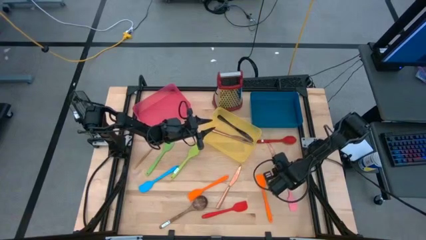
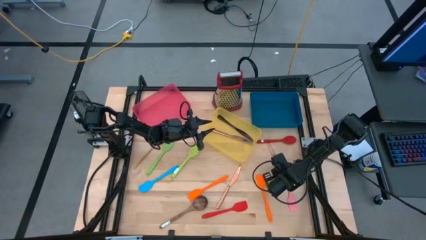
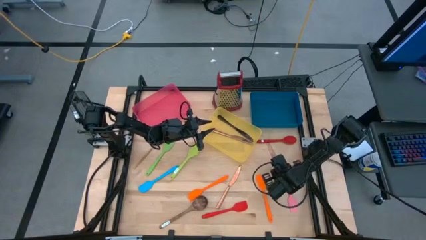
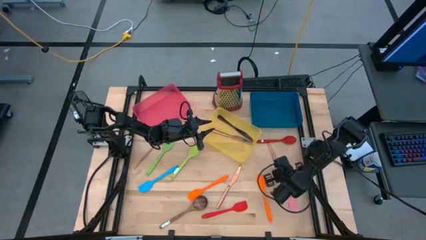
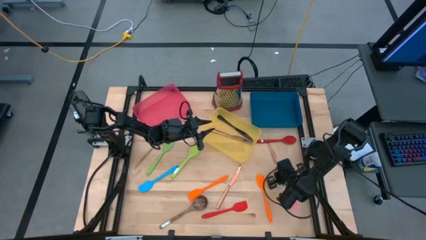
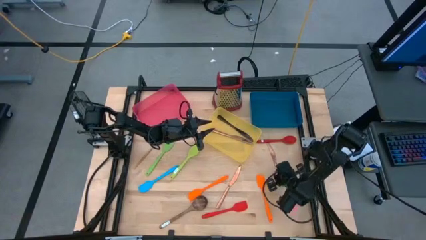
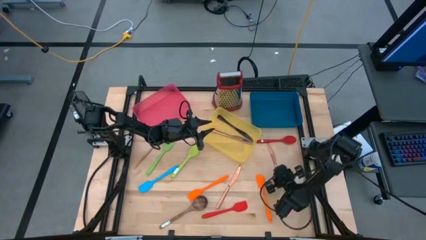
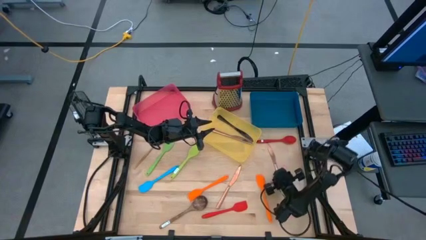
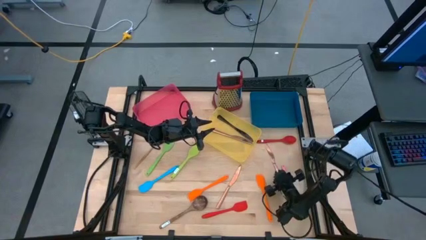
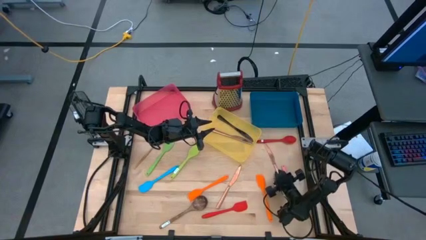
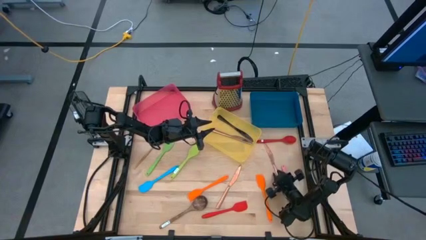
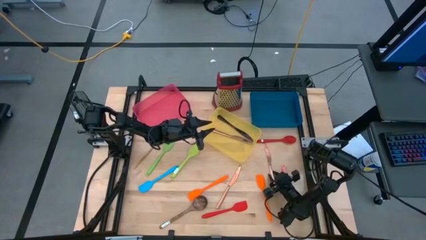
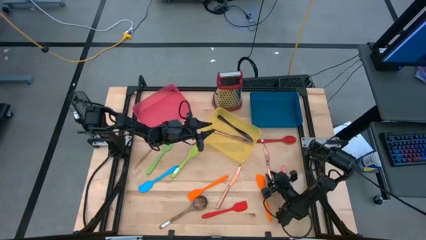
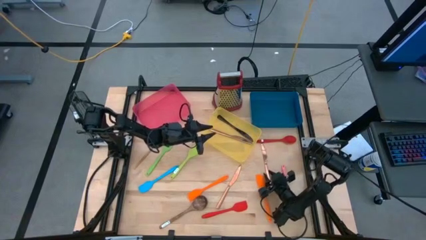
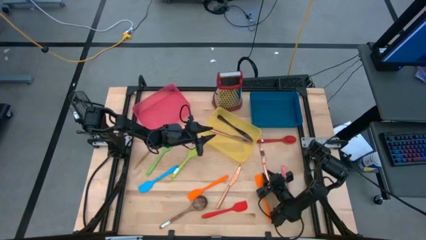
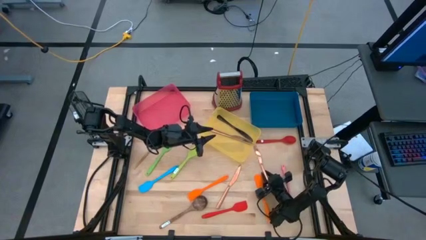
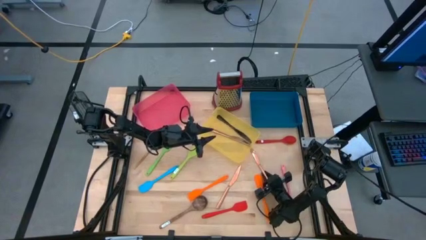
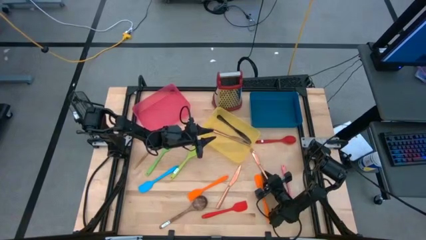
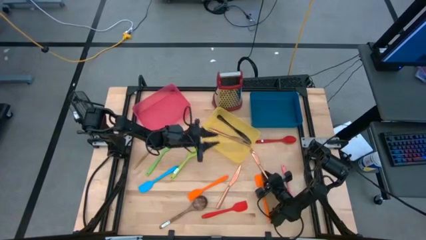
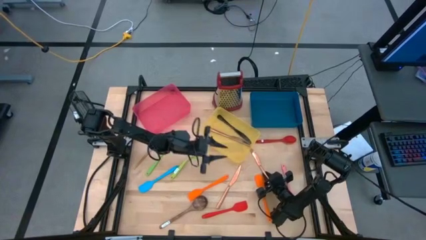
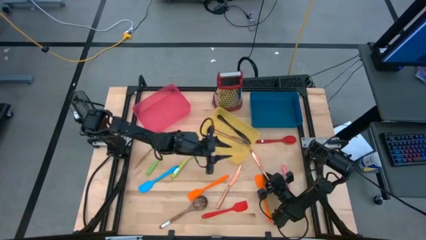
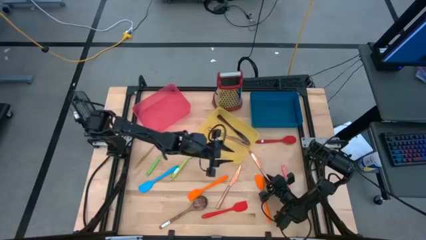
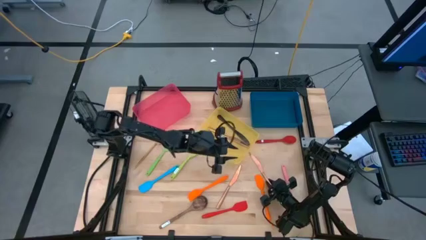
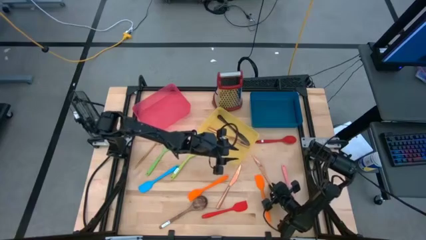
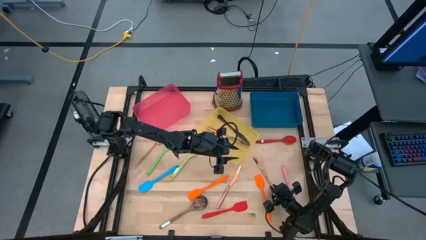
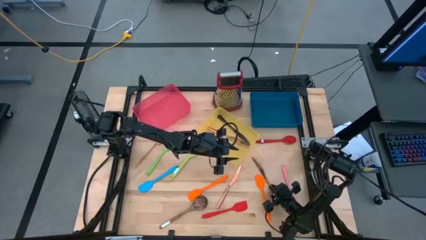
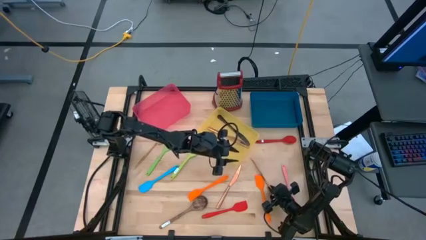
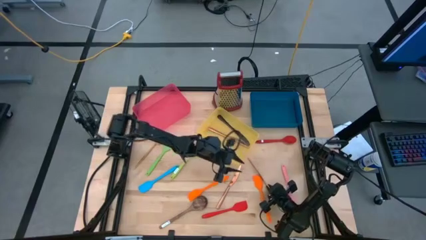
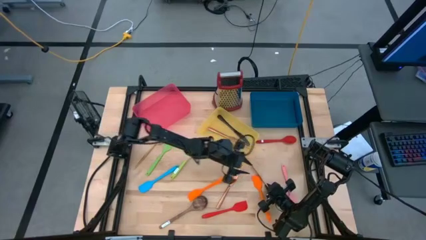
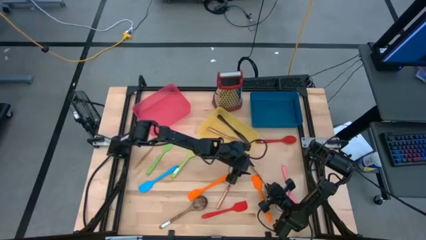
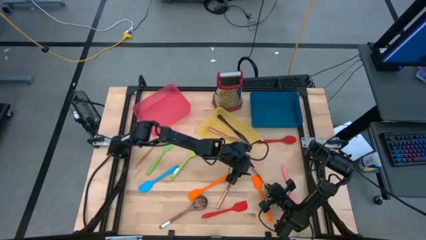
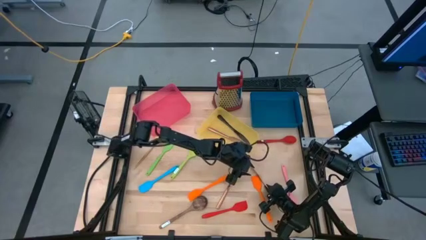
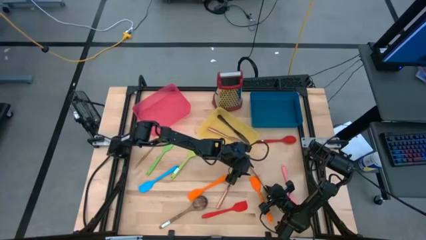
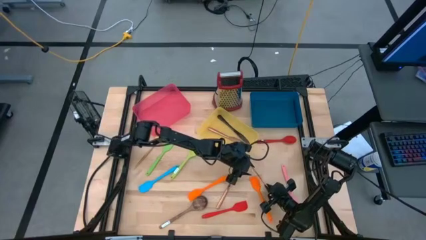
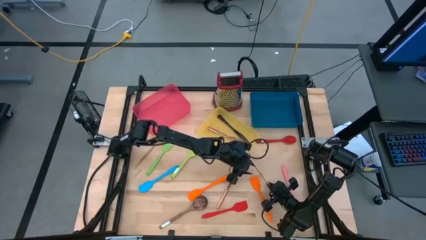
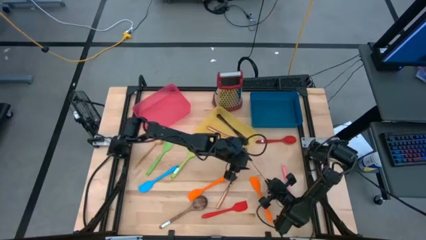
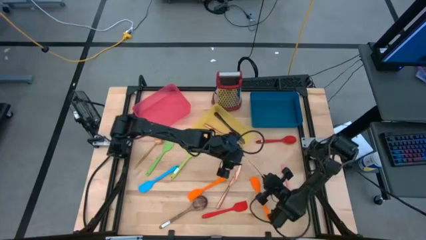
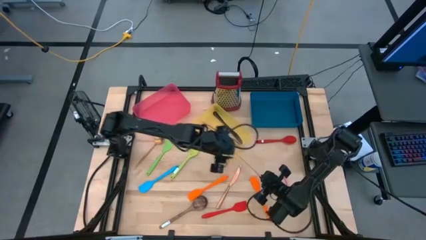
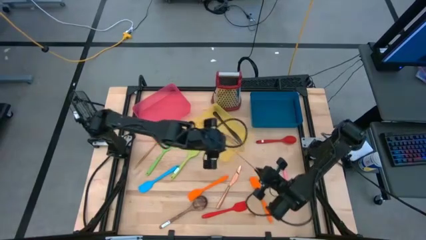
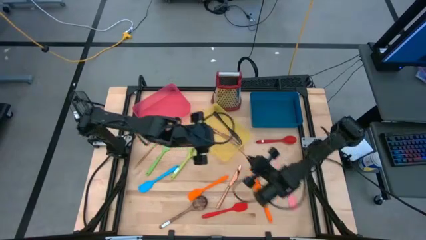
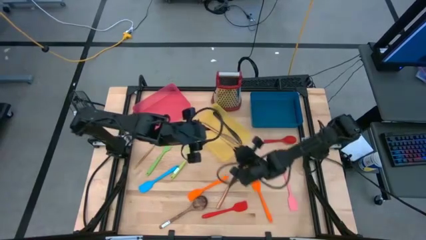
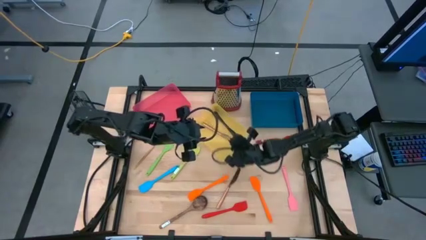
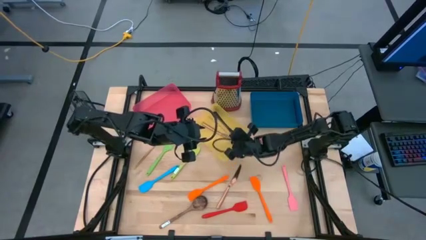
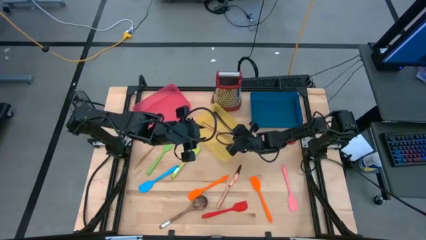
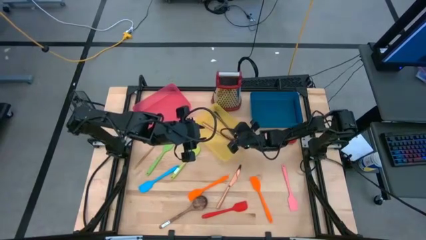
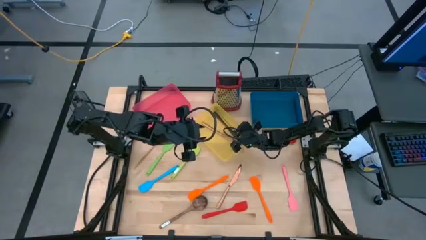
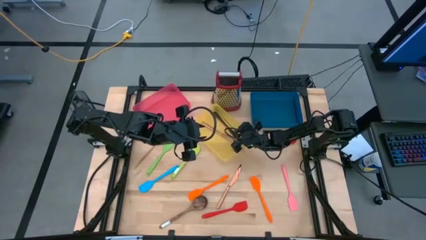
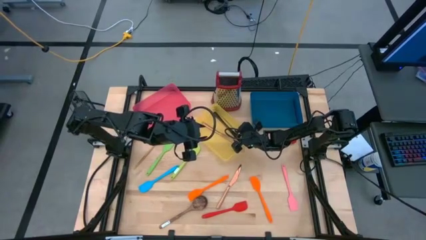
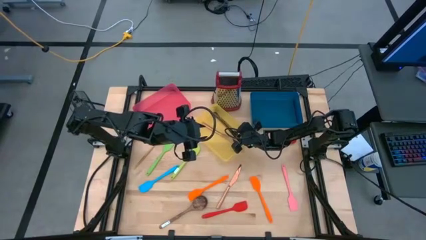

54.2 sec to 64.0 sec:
Task: Pick & Place Kitchen Items
Put the brown table knife into the yellow bin

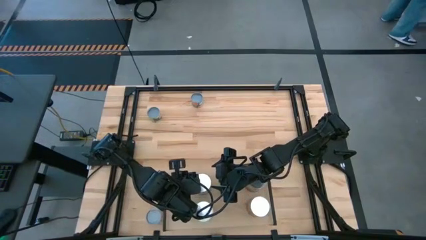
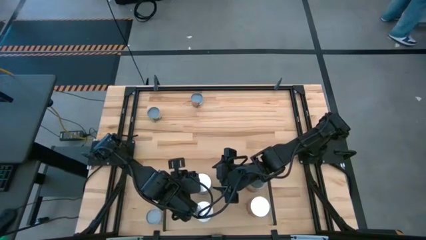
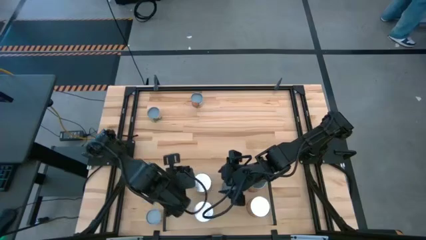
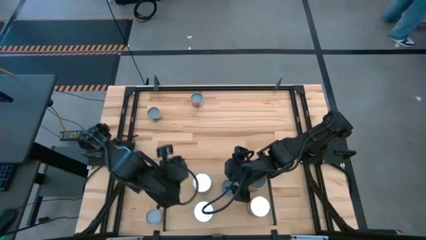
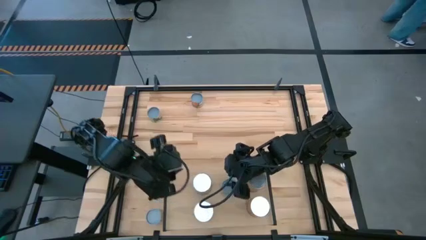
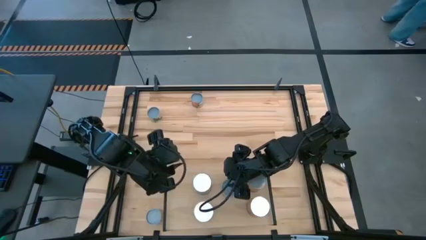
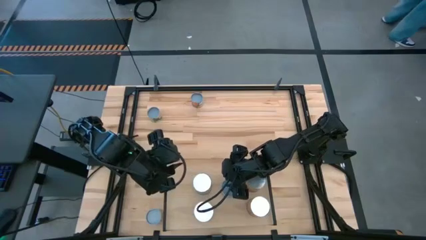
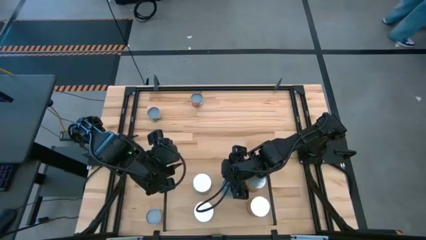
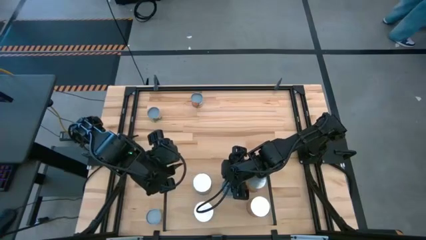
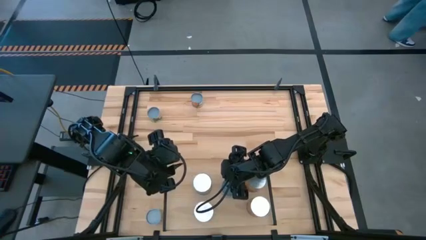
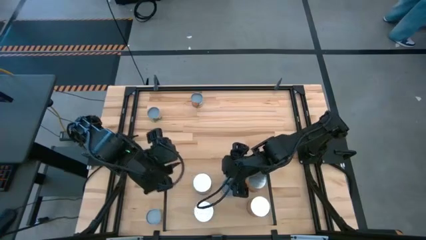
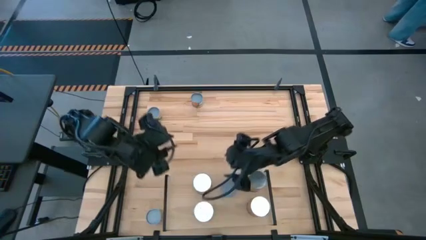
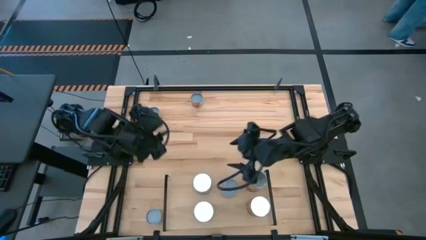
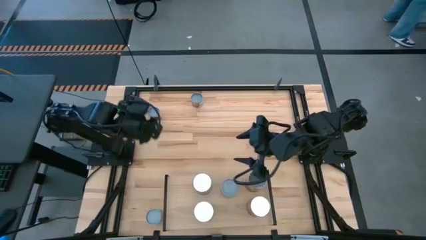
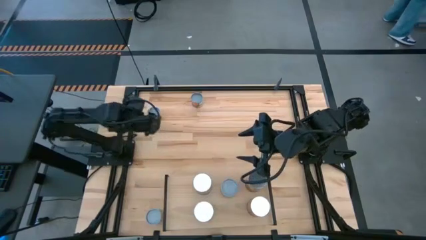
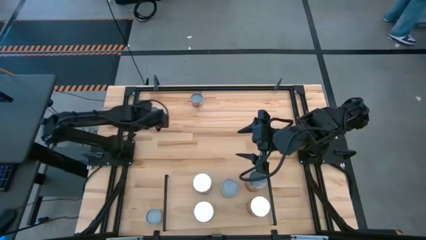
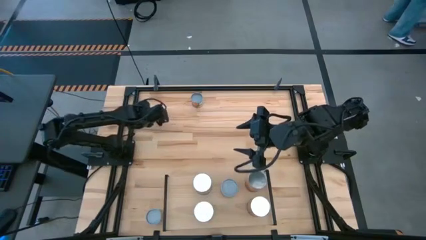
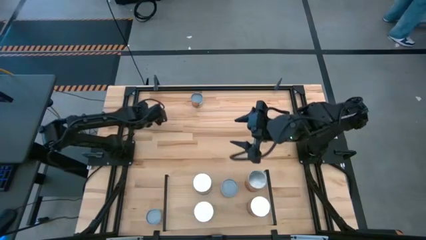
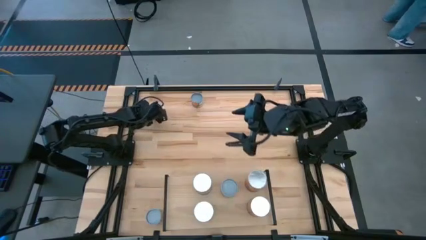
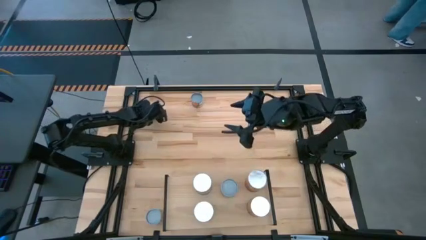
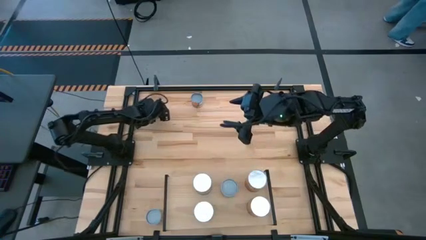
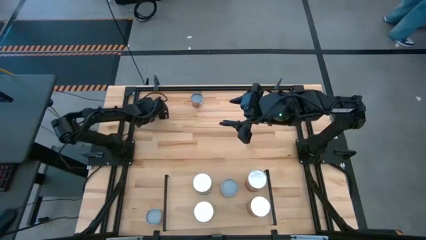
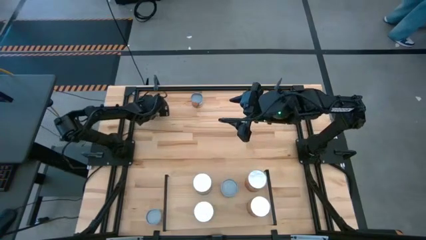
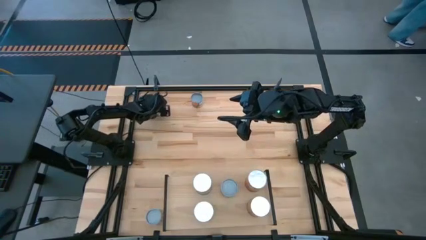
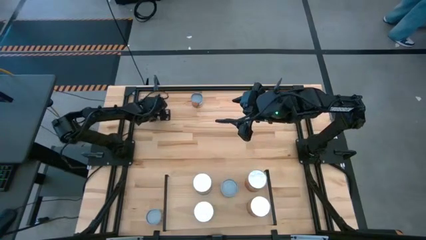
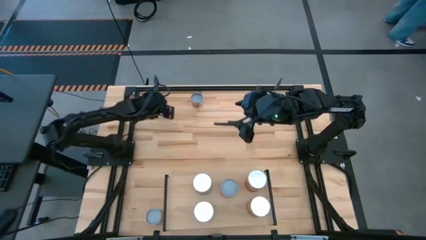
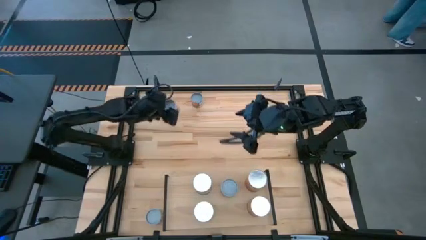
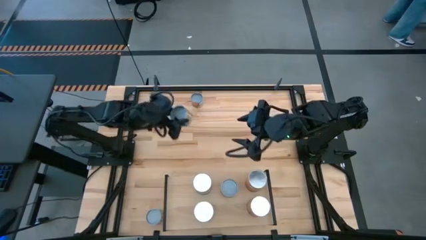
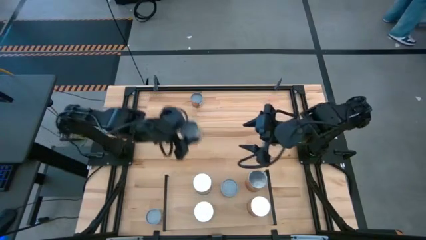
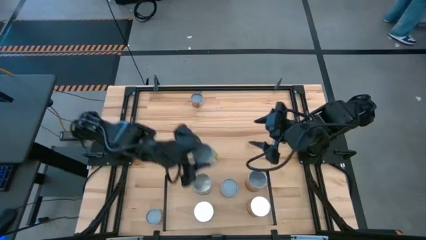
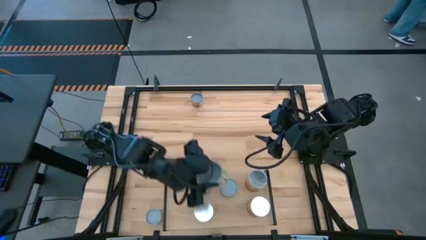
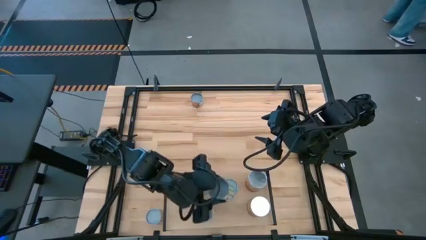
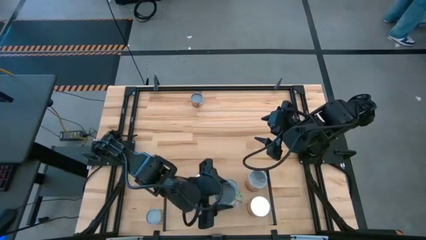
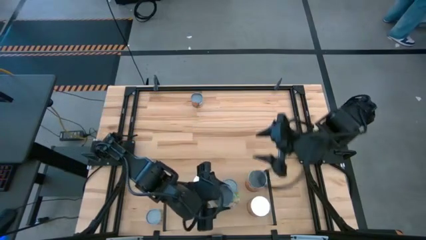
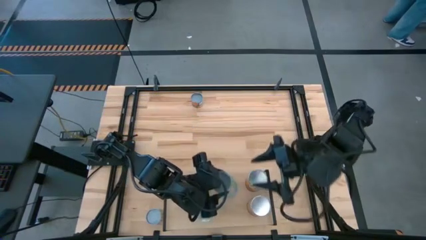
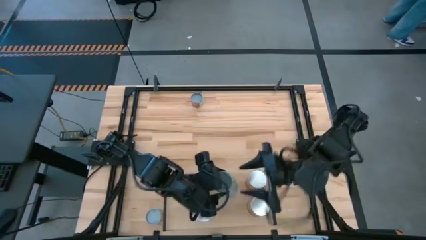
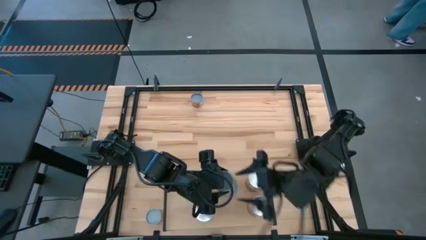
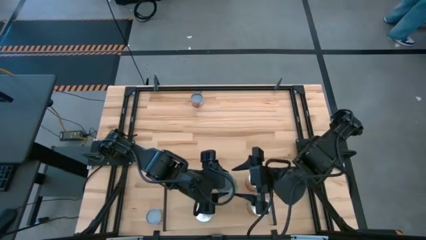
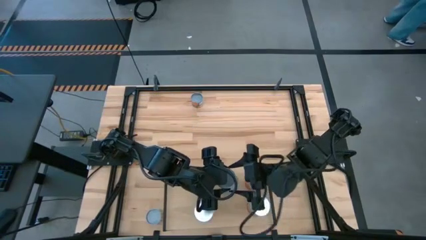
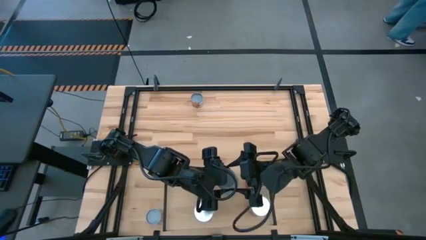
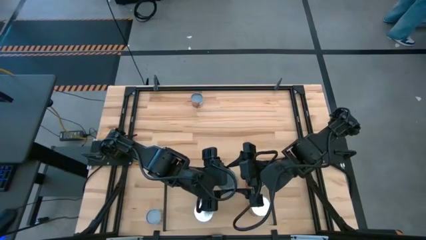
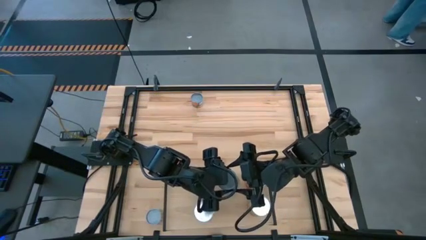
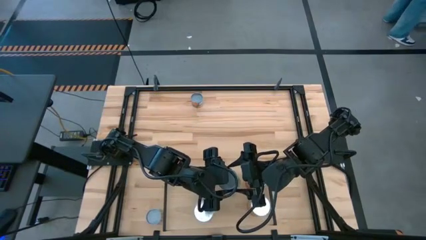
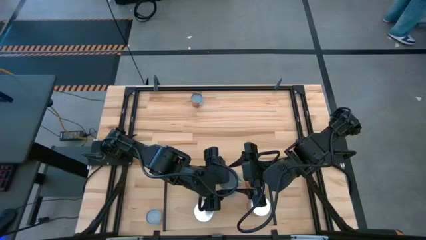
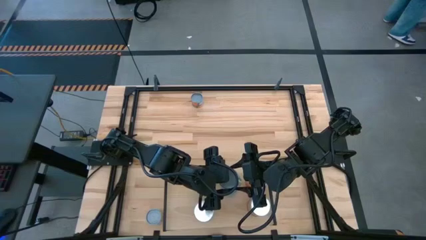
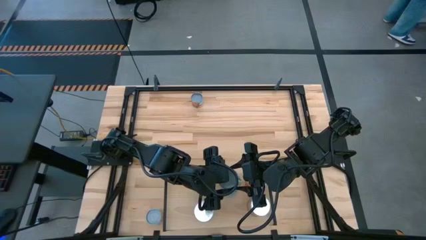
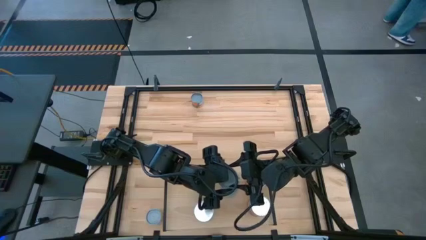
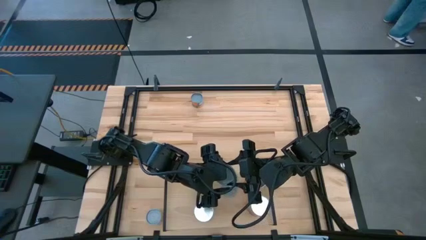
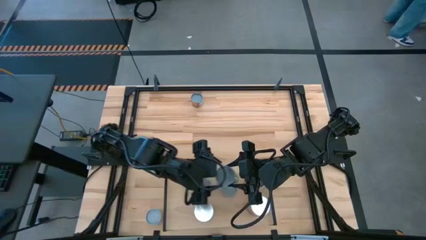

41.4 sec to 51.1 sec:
Task: Pick and place cans onto a shelf
Put the small canned peas on the shelf
